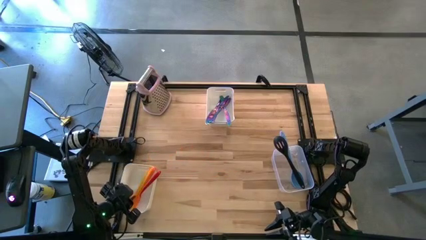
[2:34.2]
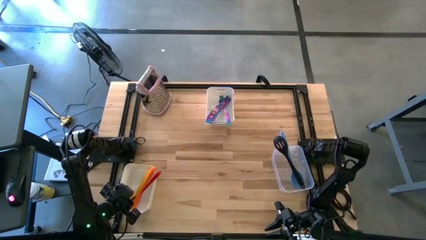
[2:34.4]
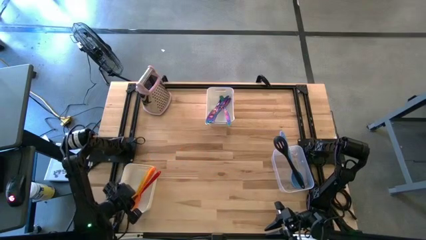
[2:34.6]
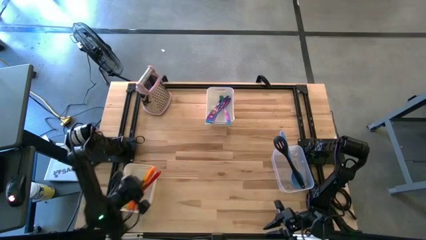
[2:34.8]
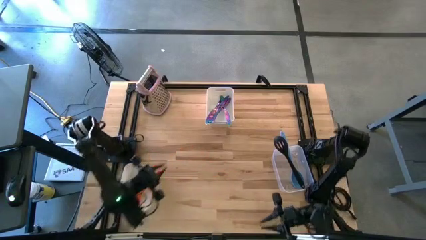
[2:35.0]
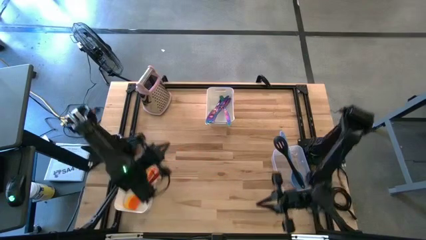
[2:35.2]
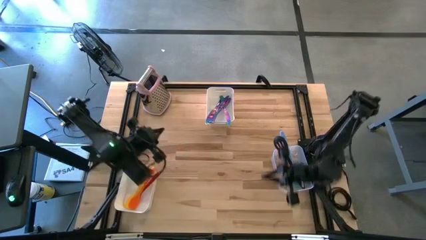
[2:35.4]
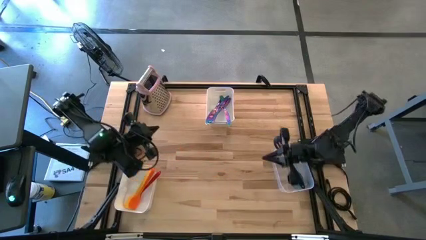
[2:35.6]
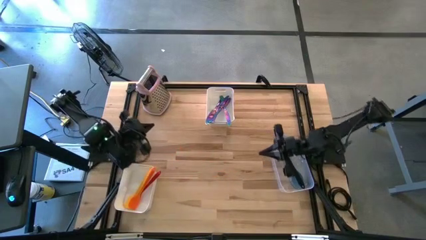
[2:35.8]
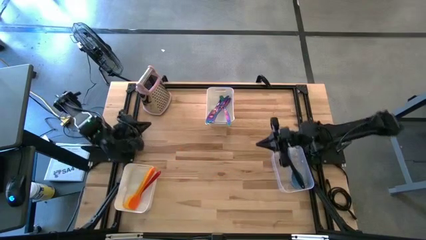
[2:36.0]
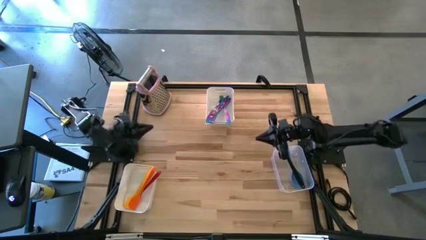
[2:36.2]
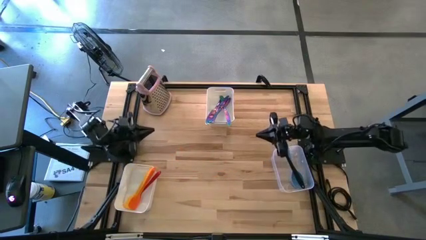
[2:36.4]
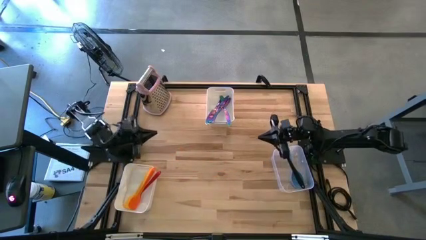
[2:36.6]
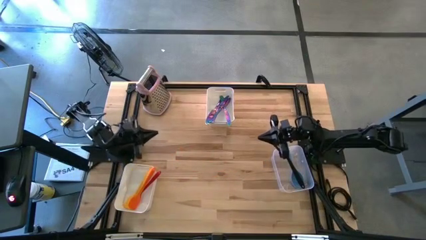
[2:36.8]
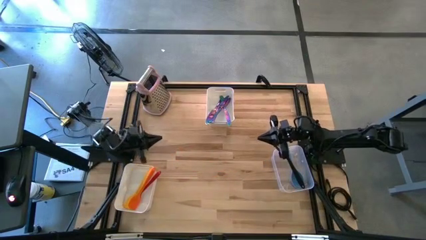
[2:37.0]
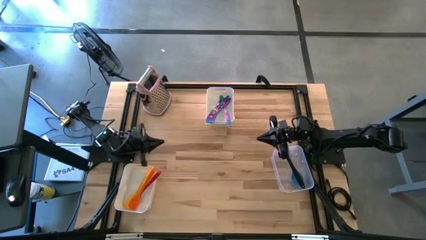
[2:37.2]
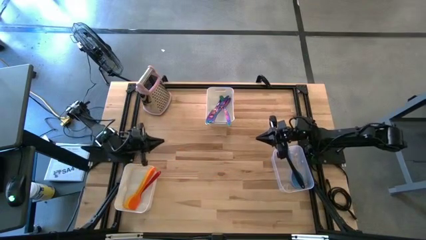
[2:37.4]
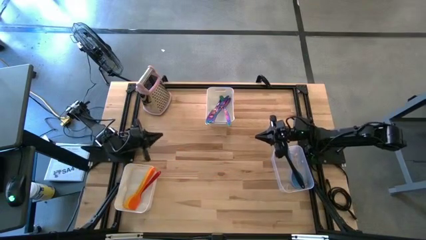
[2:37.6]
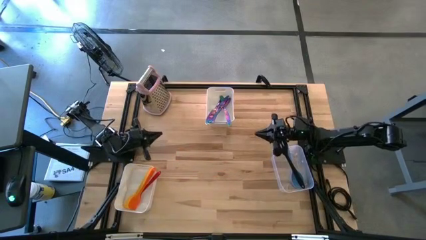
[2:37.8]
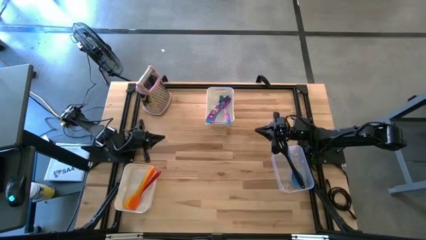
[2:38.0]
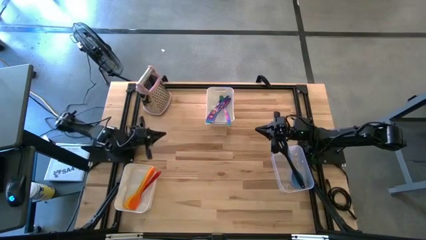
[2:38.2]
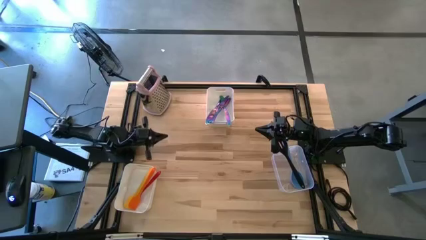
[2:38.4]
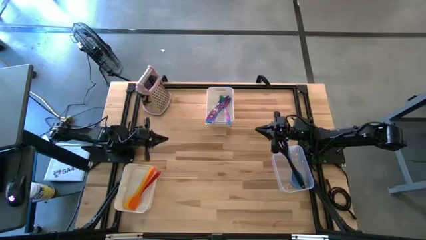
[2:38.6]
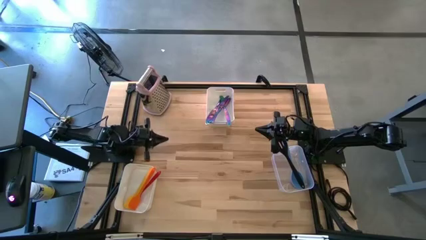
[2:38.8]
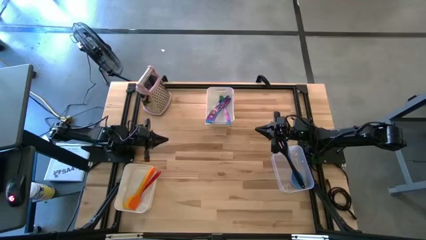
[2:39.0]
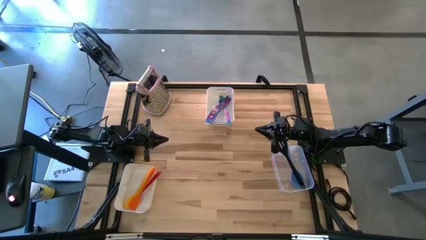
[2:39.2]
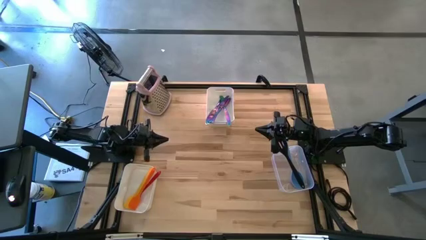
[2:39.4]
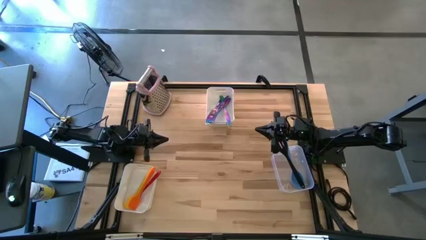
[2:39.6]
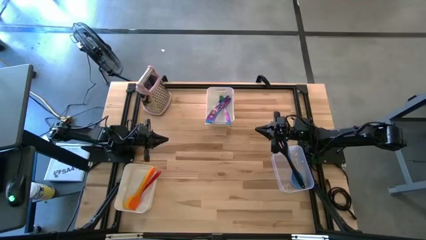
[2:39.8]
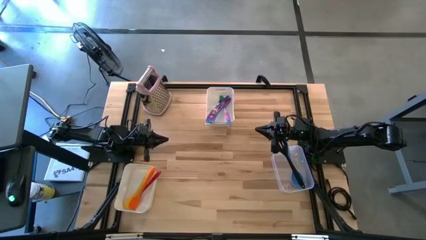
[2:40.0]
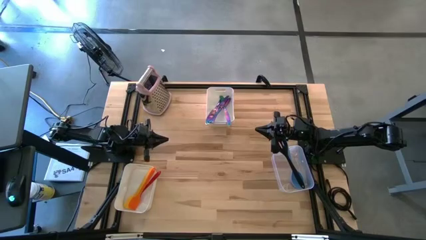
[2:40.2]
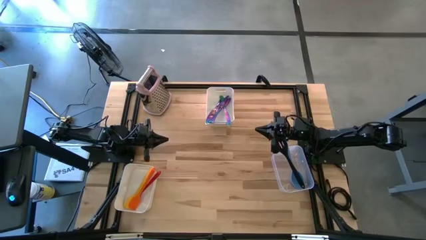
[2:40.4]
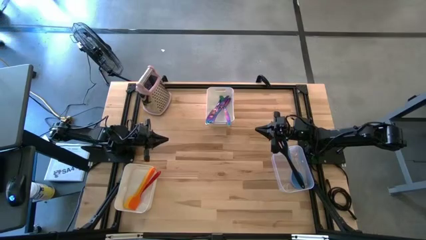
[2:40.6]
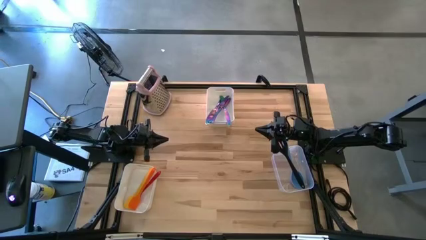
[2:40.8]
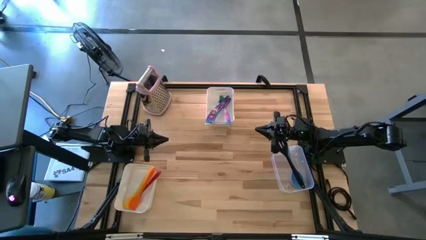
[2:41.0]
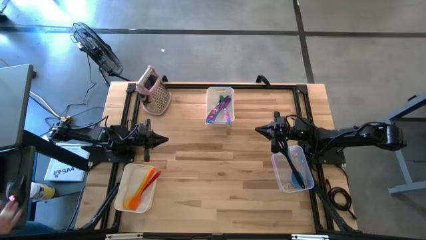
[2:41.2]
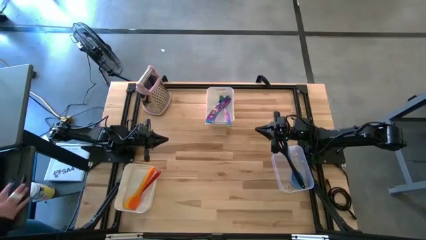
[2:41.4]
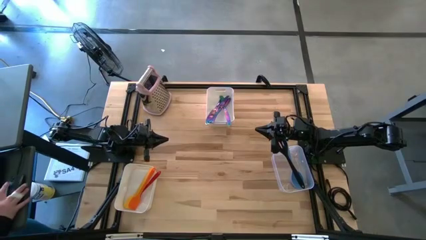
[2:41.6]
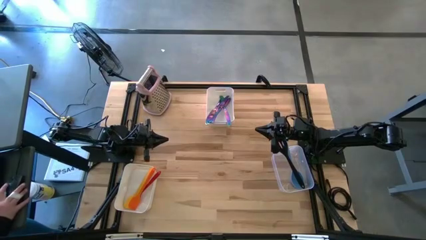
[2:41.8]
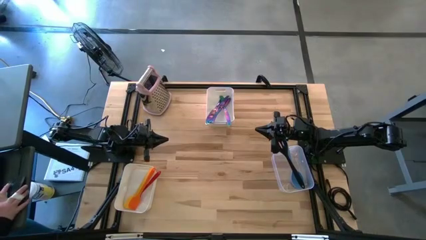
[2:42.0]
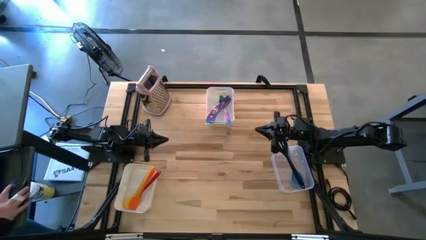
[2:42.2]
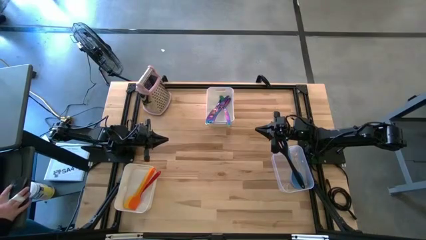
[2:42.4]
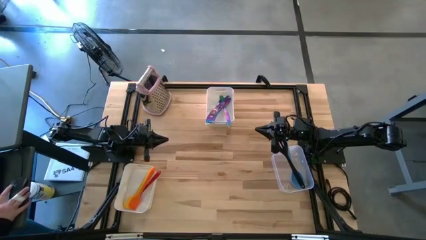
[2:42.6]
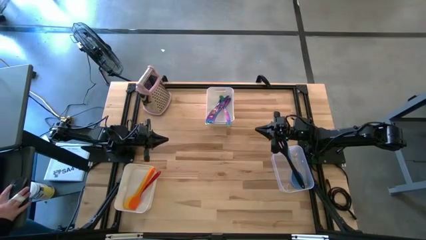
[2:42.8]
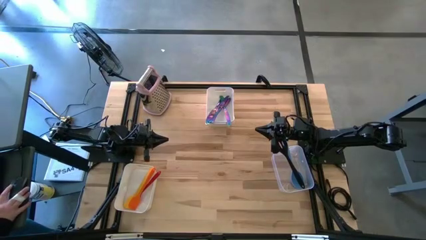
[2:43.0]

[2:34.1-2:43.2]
Task: Pick & Place Kitchen Items
Return to Home Position

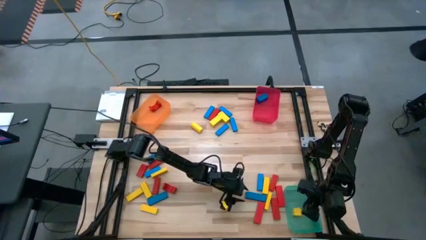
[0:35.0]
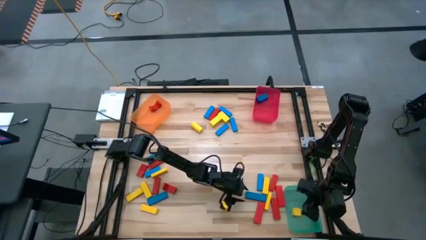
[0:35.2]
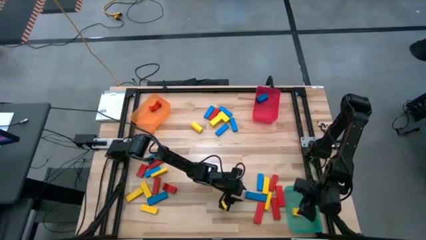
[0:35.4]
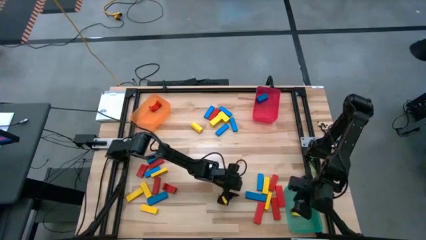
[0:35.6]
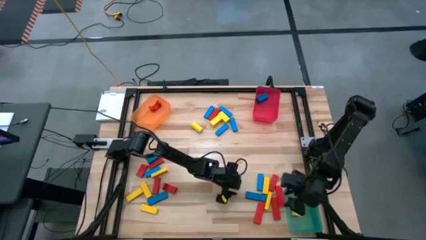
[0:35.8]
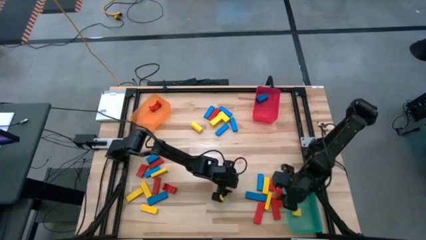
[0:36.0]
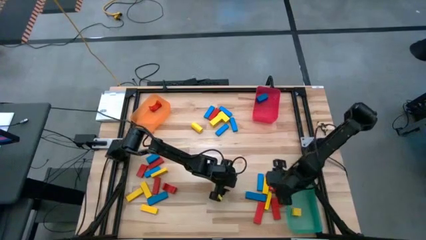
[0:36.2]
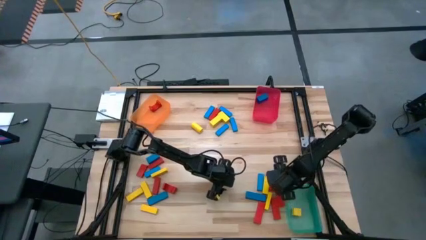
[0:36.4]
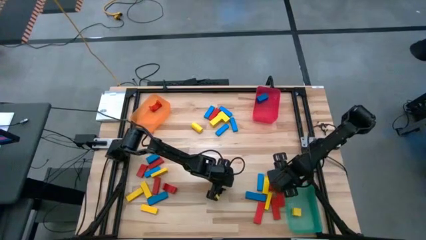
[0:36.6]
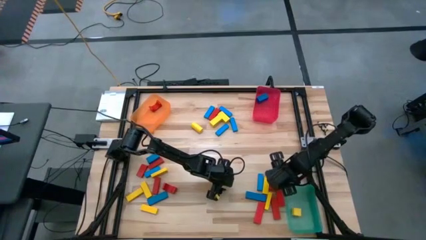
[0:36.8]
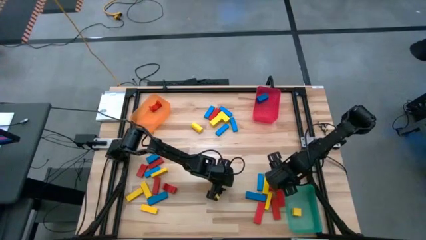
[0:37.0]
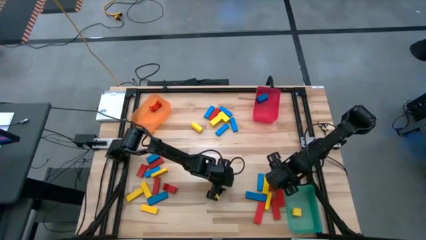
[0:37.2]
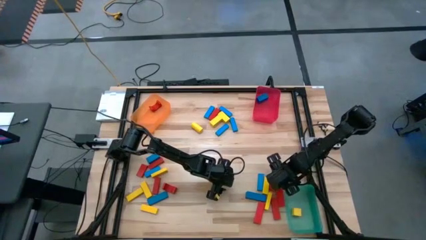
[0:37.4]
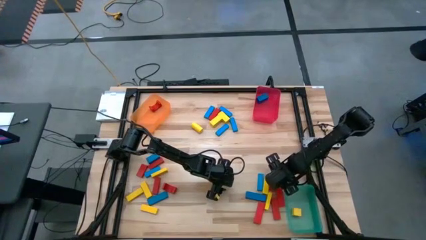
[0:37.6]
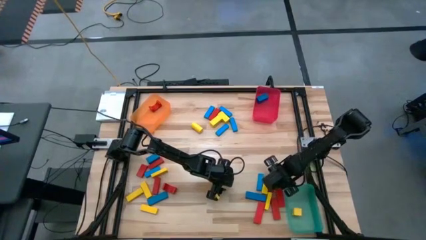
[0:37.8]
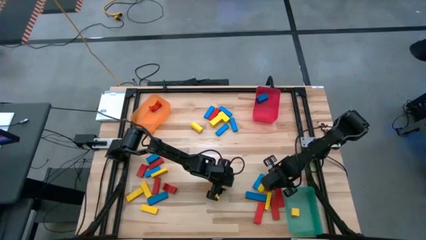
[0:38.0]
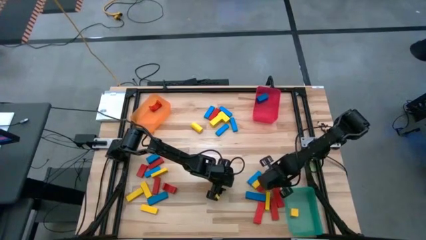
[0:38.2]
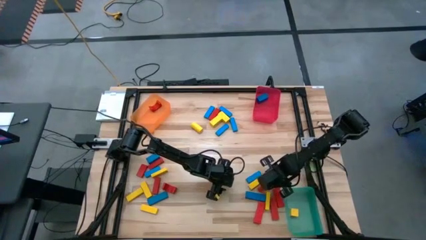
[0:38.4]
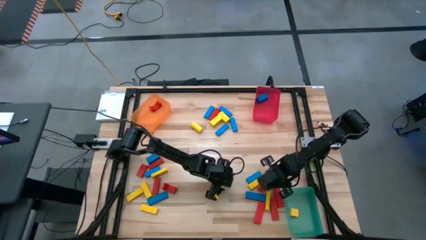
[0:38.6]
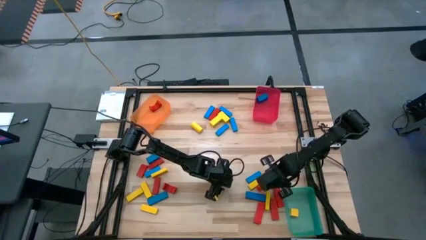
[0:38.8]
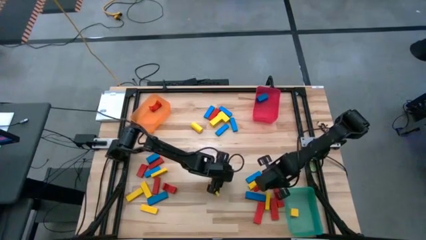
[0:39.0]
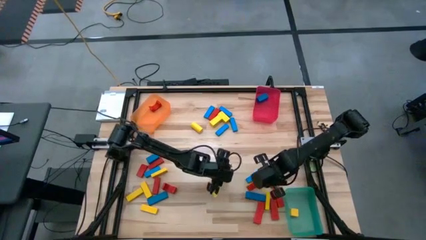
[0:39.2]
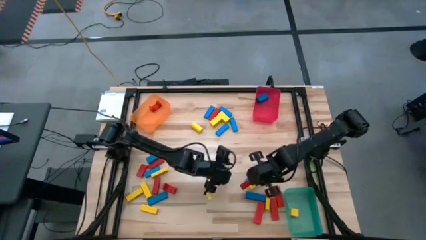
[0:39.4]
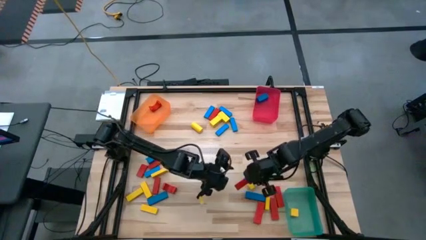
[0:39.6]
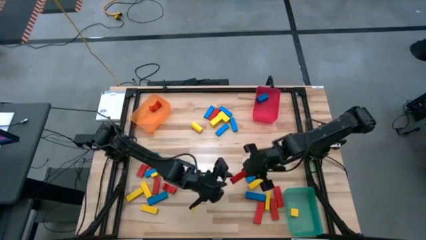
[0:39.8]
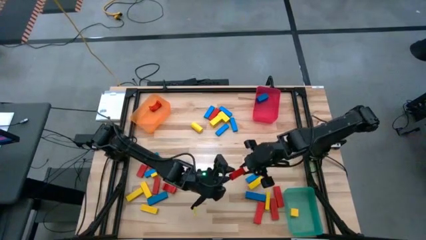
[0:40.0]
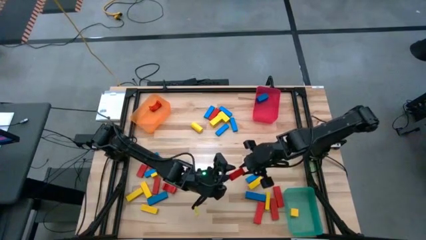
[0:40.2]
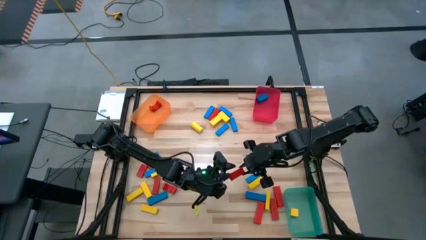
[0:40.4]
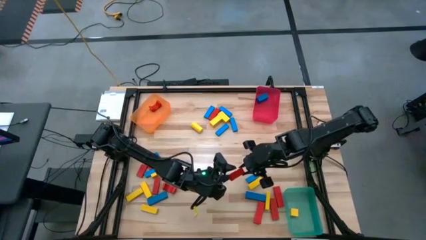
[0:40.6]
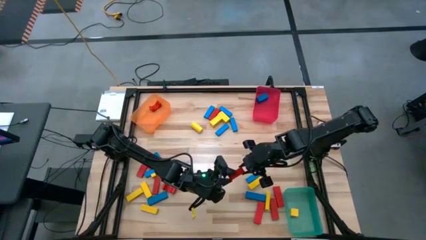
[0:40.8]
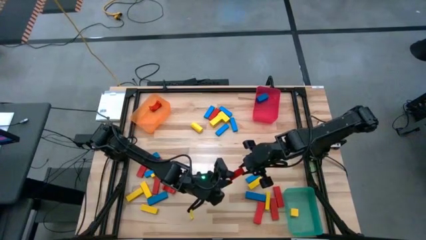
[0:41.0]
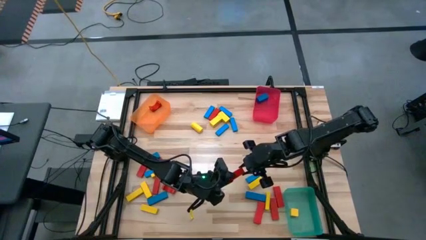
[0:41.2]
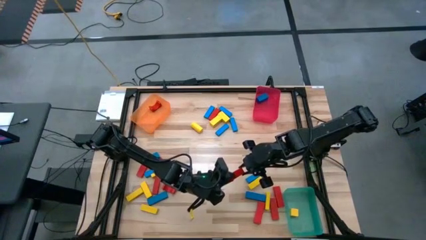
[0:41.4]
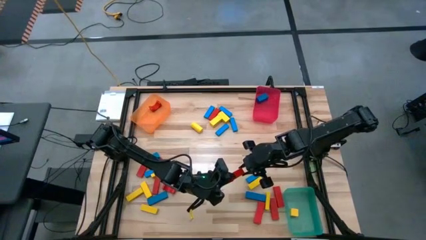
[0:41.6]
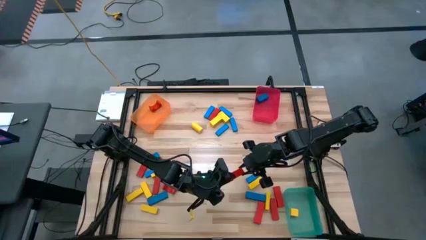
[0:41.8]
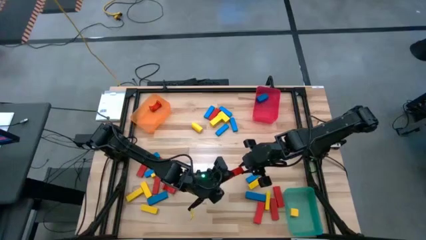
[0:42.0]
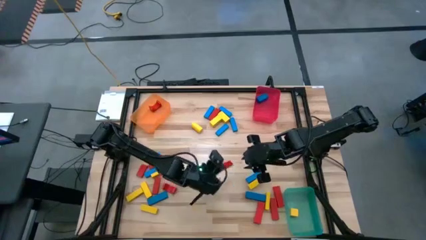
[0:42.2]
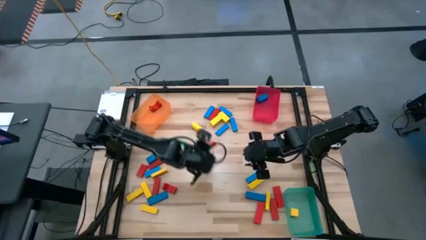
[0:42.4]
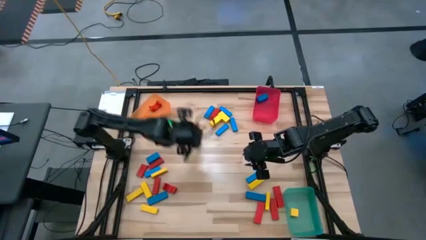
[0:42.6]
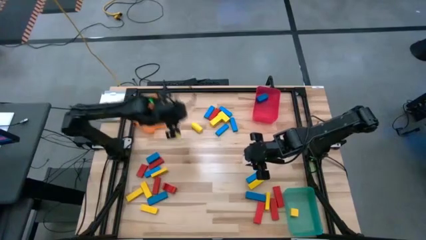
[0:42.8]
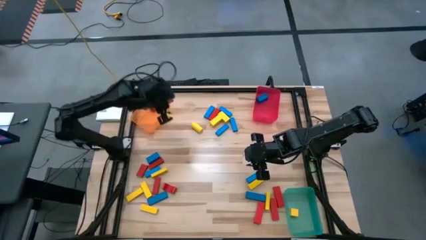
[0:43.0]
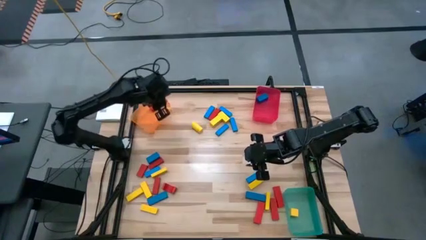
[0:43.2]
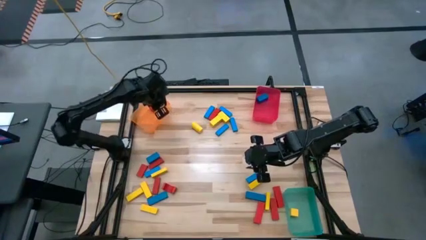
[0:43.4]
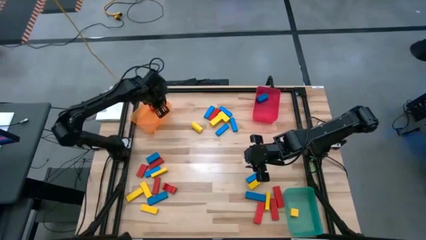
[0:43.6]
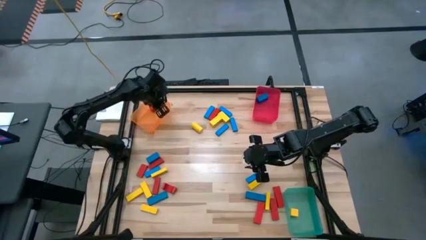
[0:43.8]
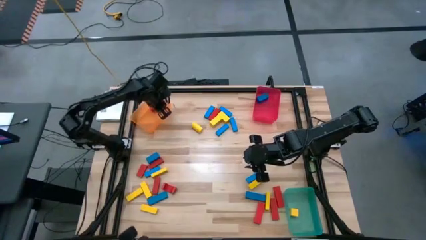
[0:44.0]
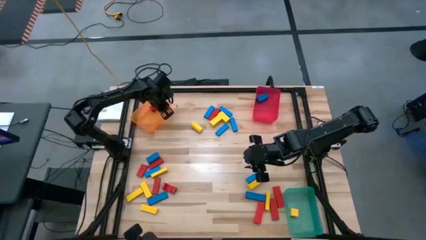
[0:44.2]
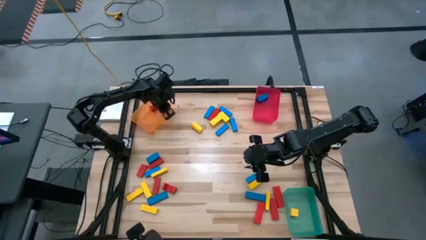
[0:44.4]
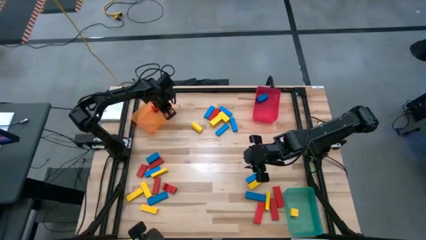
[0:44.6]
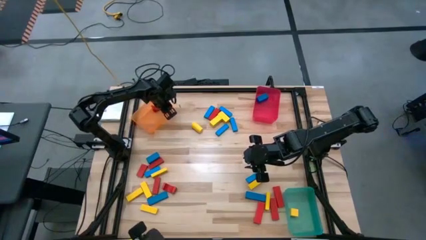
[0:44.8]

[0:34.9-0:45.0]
Task: Sort blocks
Put the red block into the orange bin
